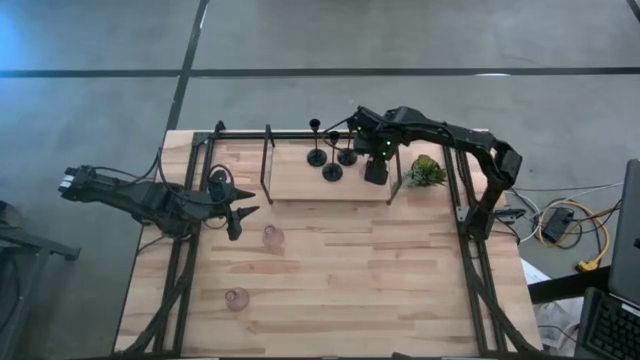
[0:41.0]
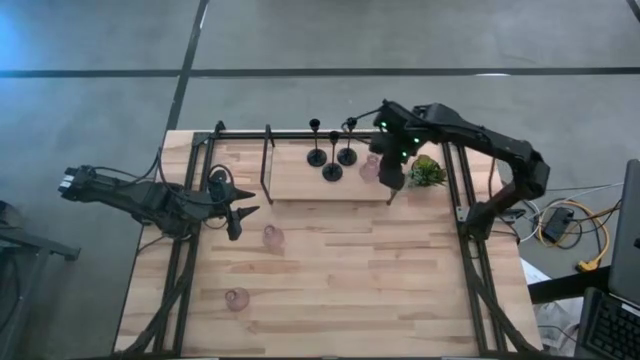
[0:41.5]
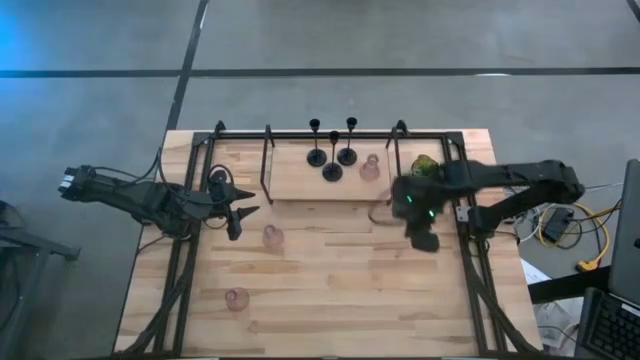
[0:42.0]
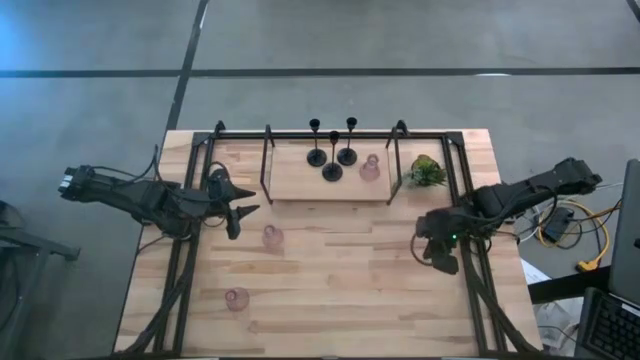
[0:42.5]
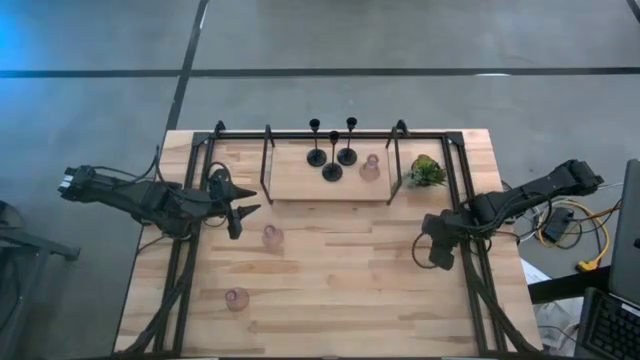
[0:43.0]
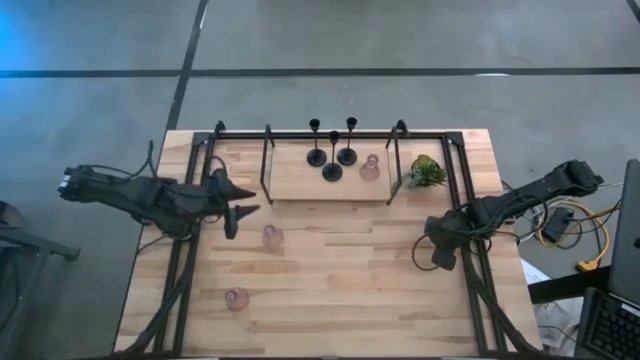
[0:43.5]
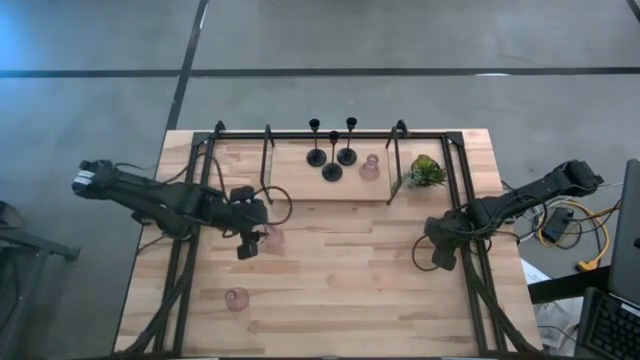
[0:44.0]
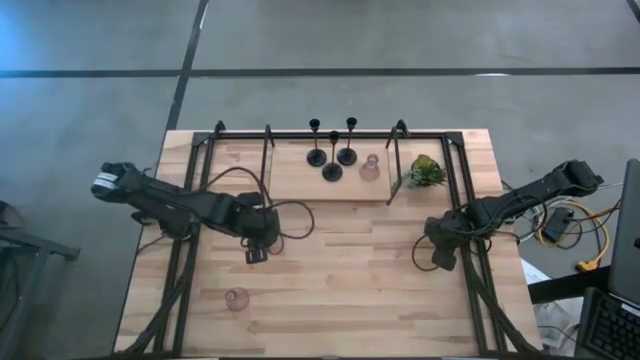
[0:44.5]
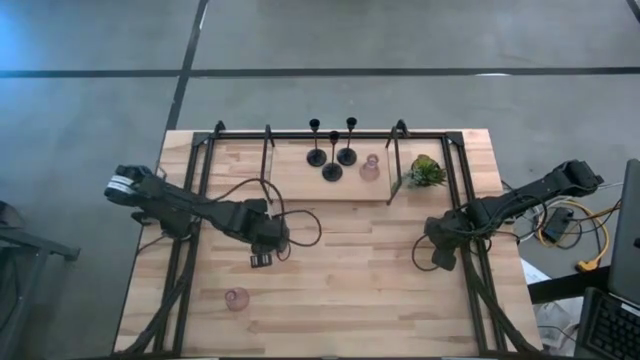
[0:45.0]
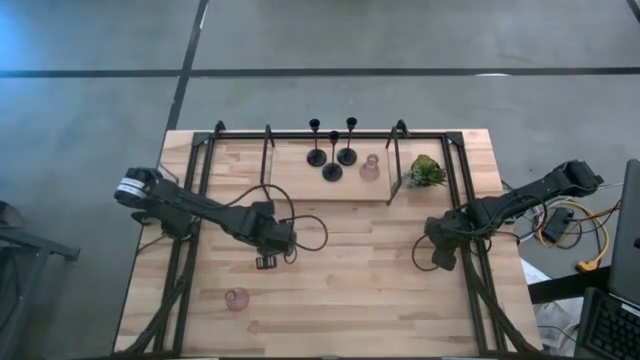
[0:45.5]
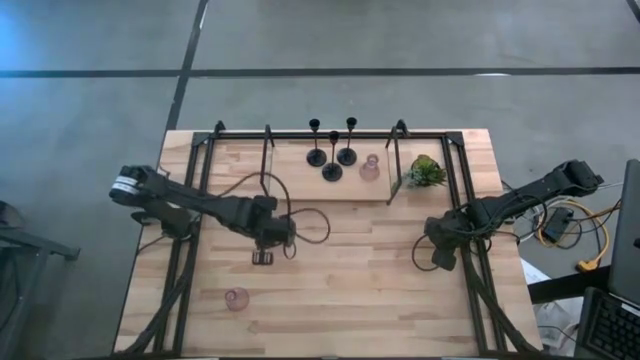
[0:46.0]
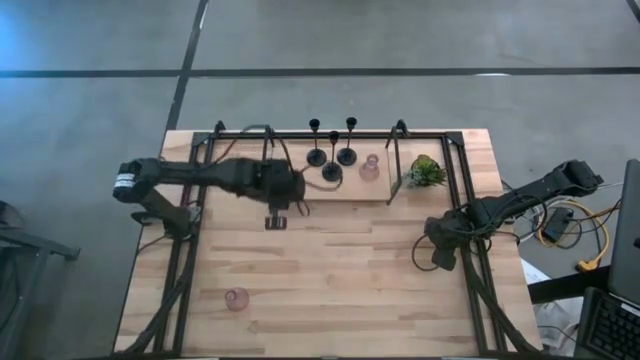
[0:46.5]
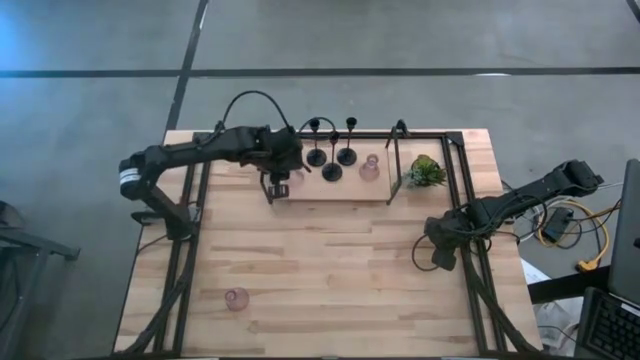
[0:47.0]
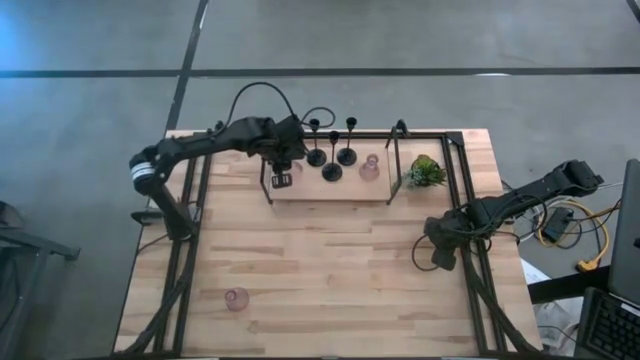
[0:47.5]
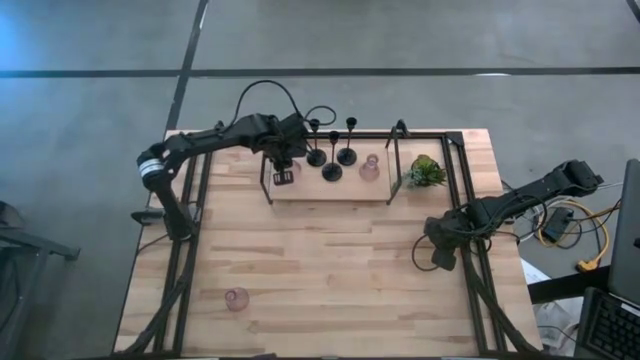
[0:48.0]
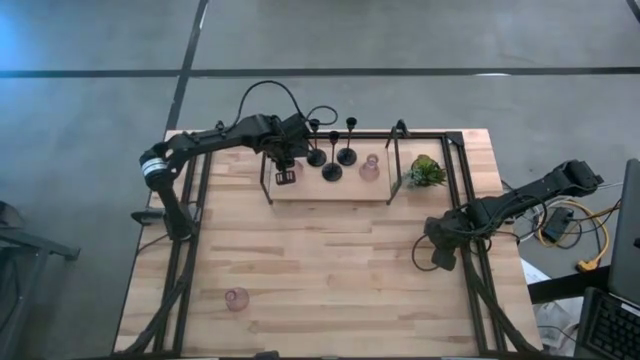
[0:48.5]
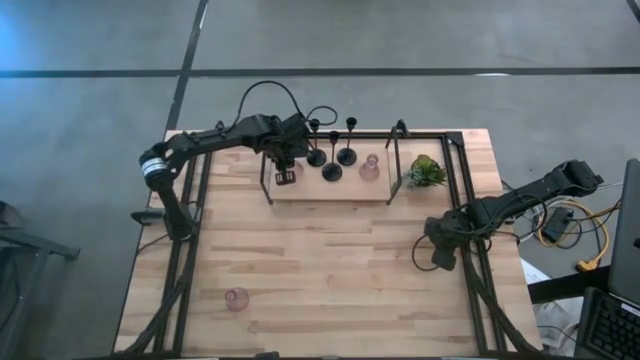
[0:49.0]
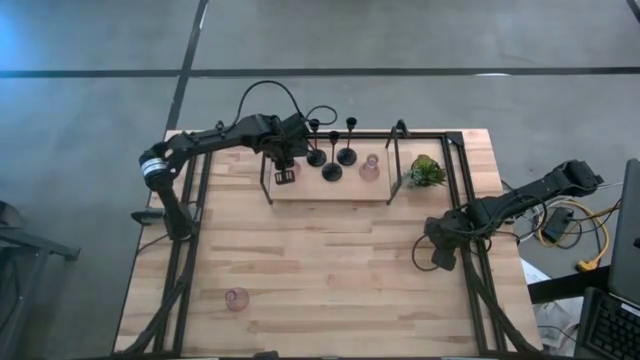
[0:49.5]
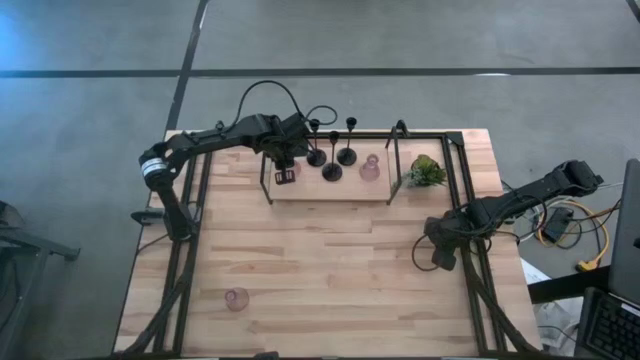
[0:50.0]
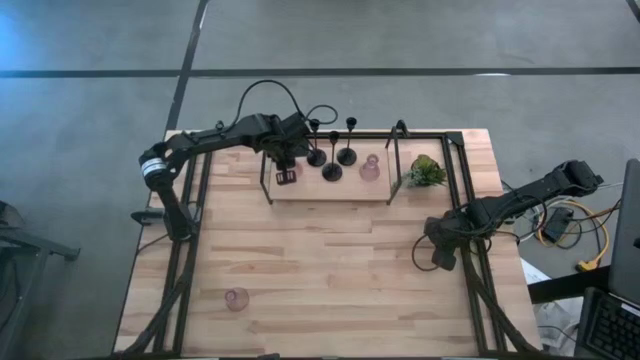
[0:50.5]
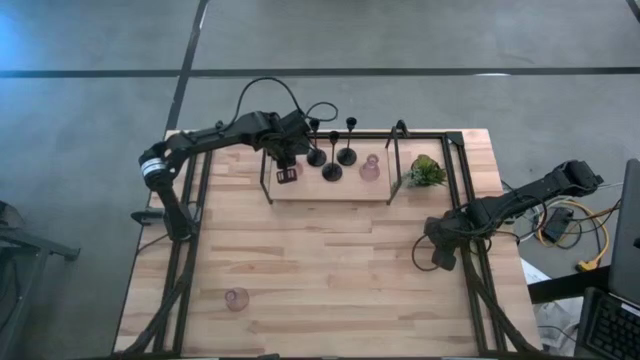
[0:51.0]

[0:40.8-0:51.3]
Task: Pick & Place candle stick holders
Put the top purple glass candle holder on the shelf

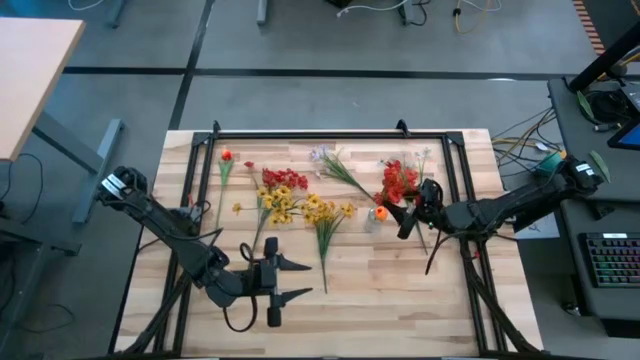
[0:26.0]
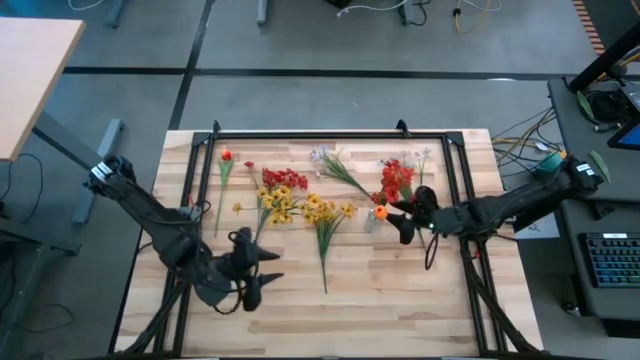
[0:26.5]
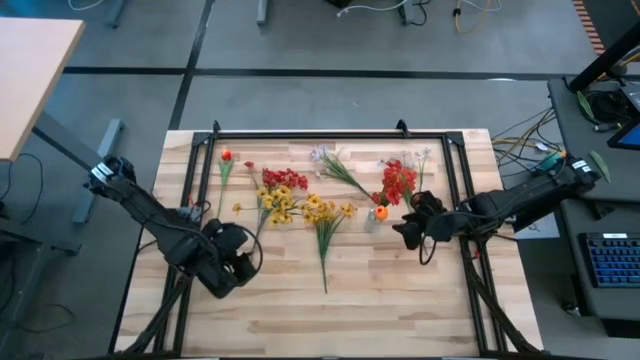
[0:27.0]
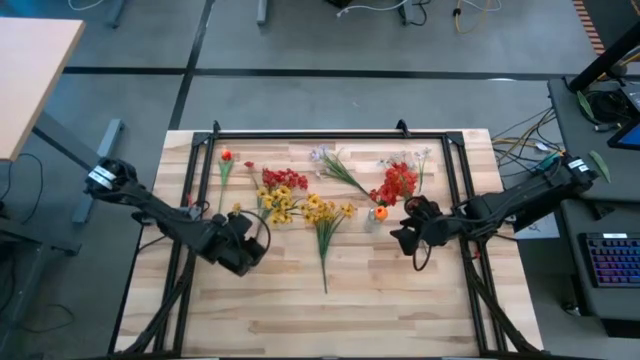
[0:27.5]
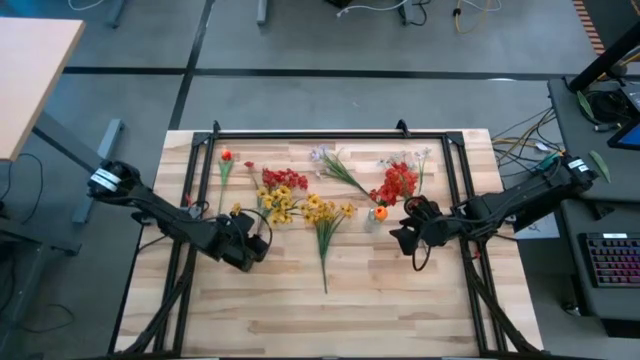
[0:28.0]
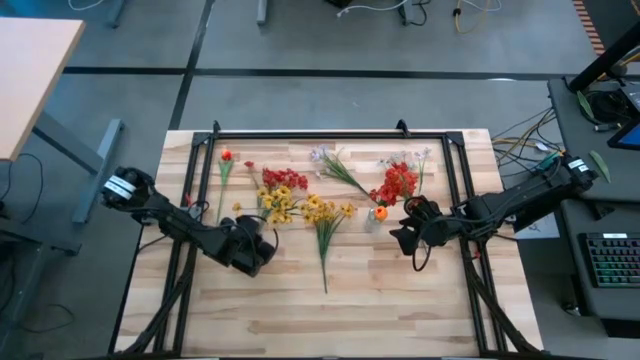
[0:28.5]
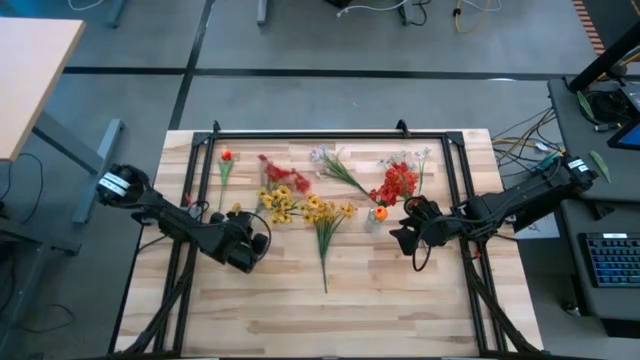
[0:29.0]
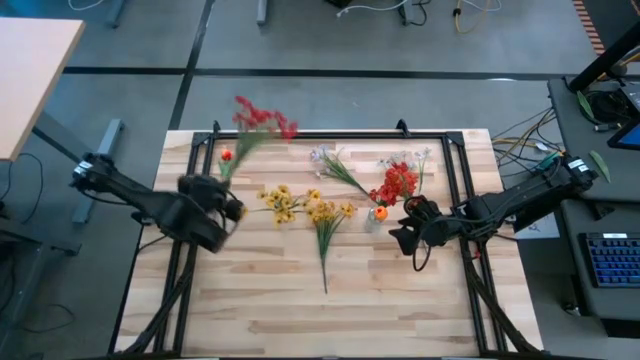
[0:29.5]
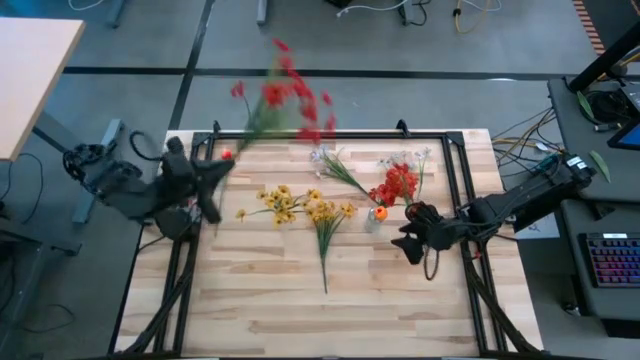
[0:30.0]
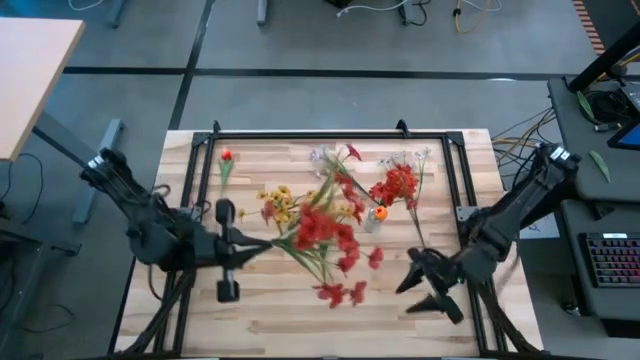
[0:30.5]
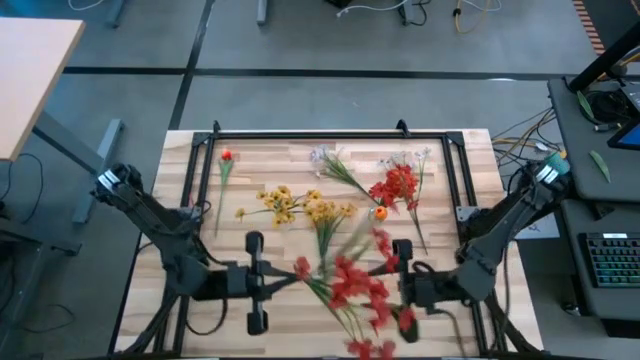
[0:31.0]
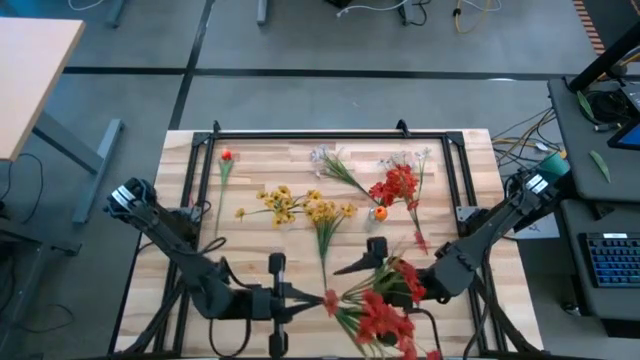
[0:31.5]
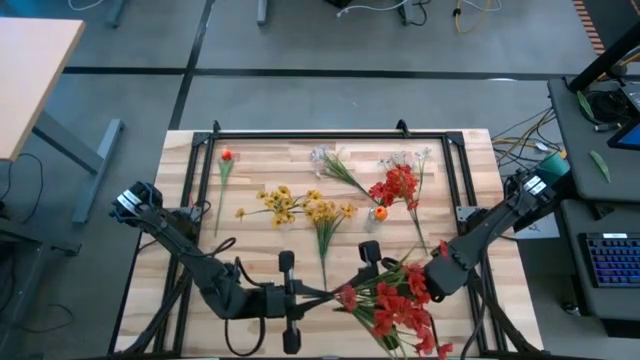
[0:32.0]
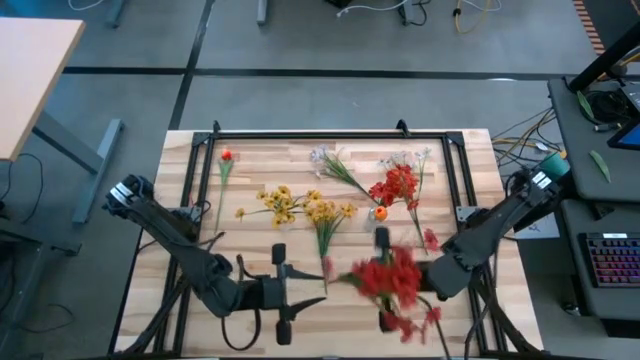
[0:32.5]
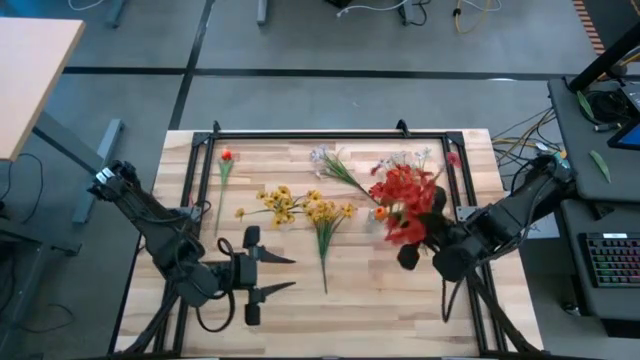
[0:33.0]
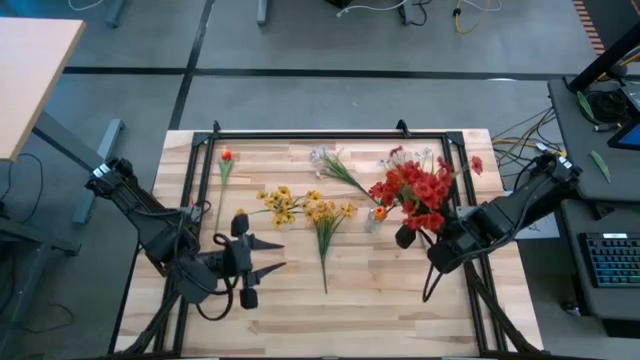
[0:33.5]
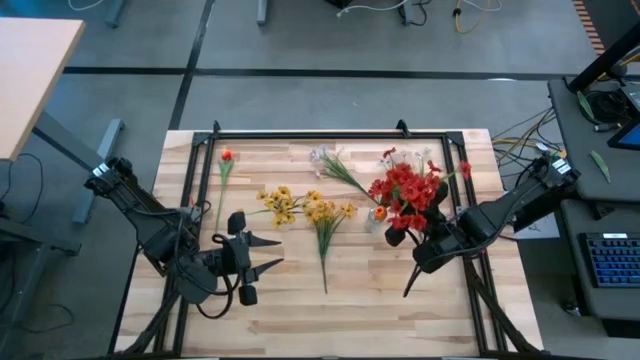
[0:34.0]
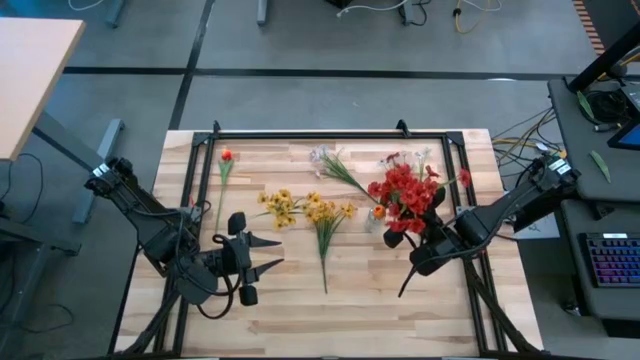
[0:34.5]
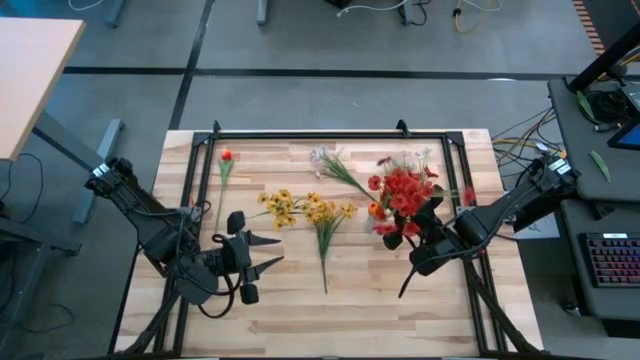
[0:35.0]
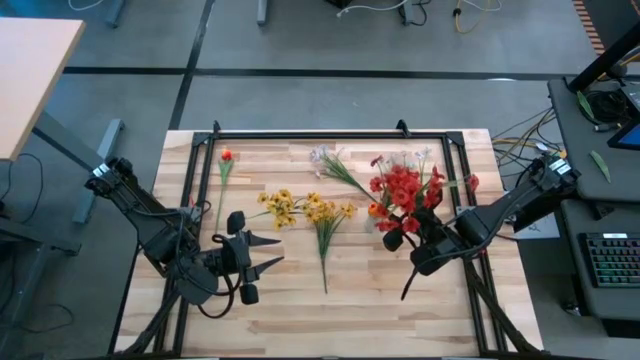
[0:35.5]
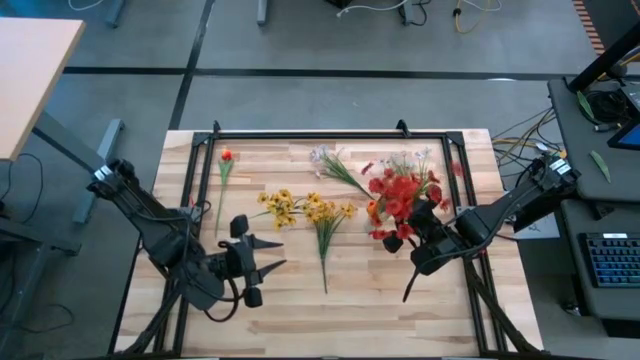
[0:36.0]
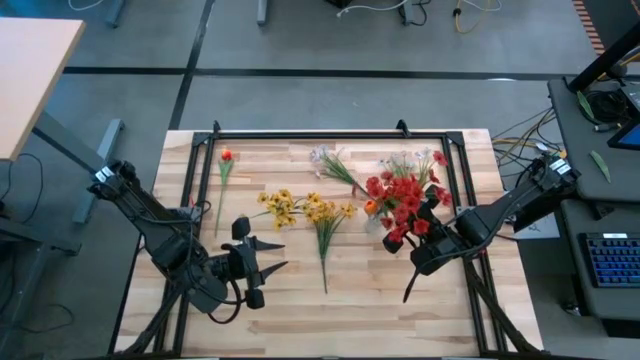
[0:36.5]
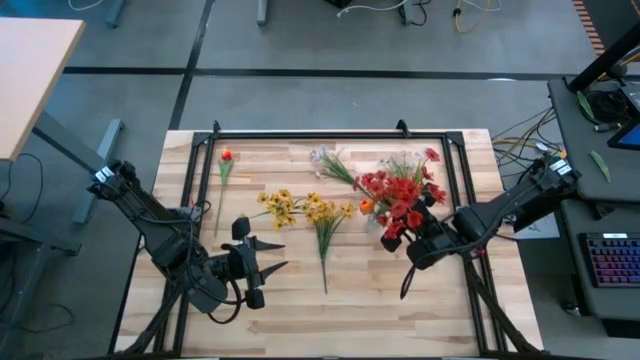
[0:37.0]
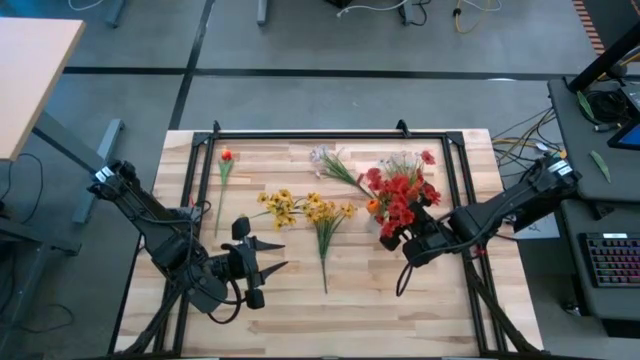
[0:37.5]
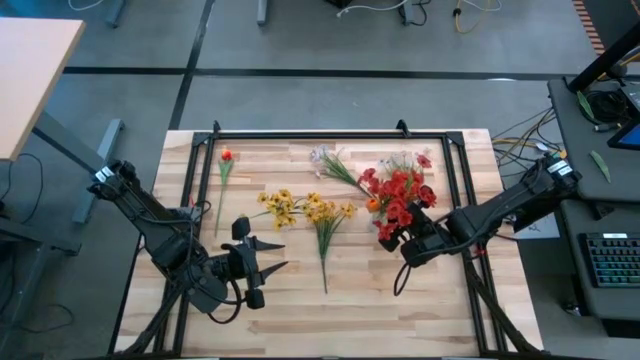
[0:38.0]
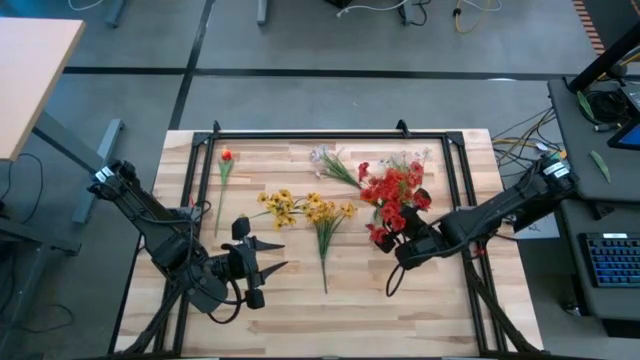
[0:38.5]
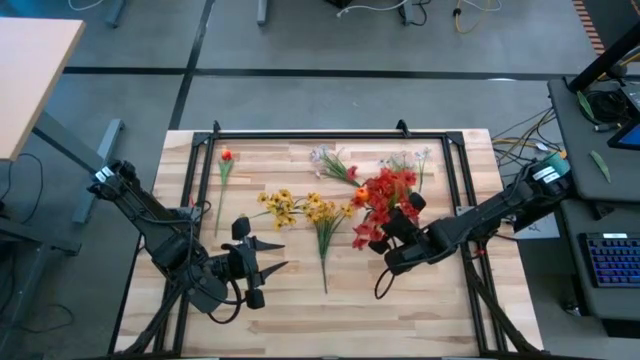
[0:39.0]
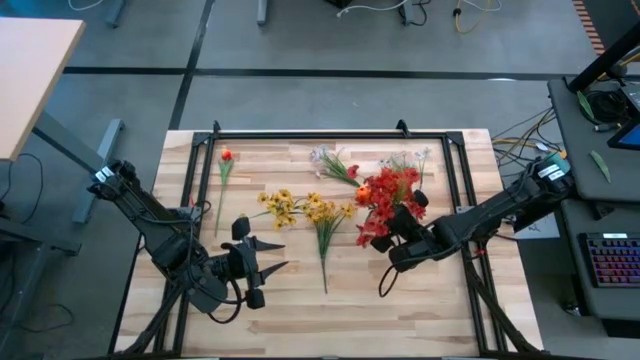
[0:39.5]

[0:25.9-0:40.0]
Task: Sort flowers into vase by color
Put the red flower into the right transparent vase
